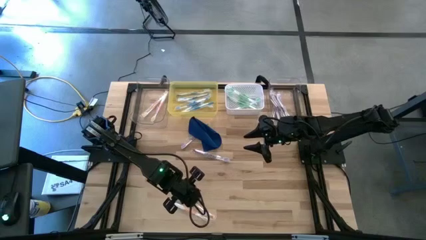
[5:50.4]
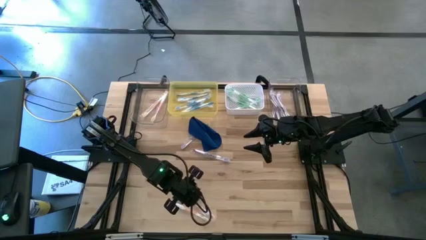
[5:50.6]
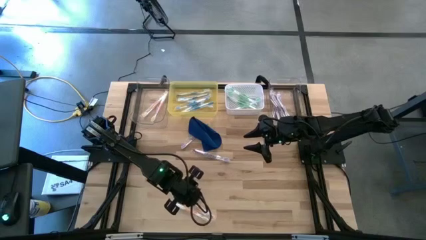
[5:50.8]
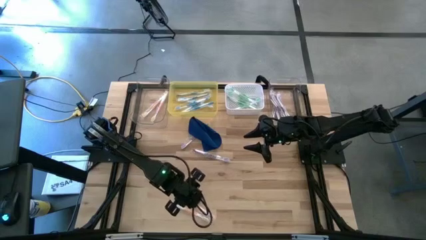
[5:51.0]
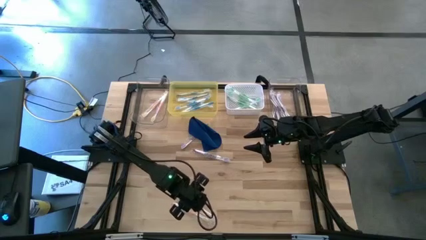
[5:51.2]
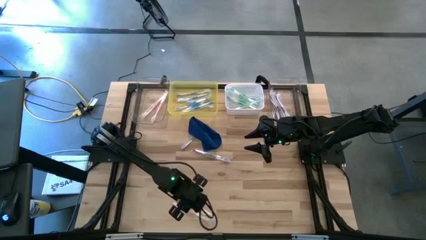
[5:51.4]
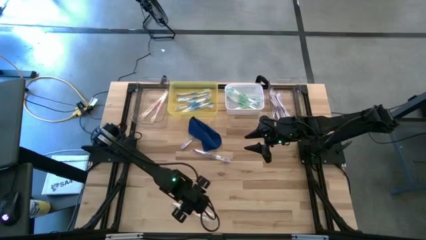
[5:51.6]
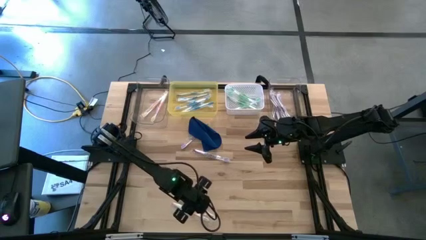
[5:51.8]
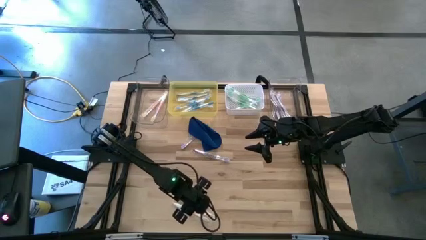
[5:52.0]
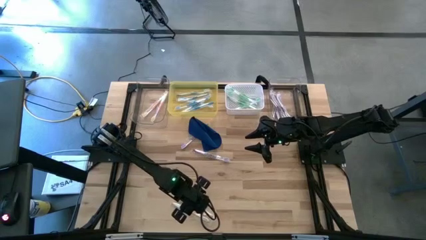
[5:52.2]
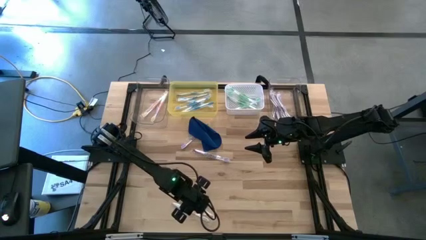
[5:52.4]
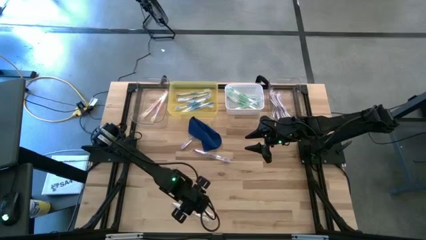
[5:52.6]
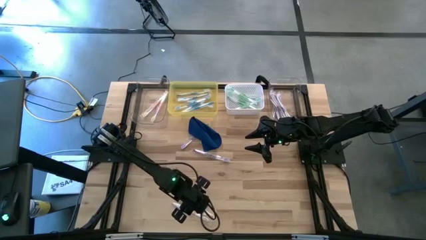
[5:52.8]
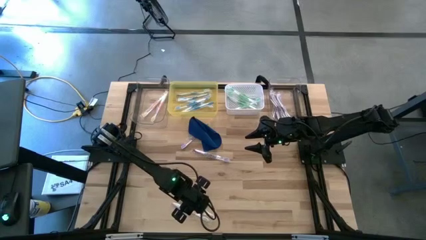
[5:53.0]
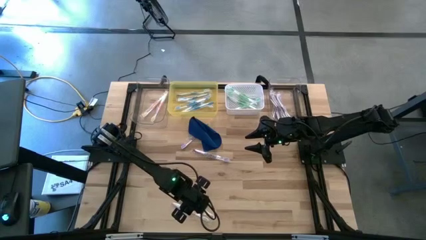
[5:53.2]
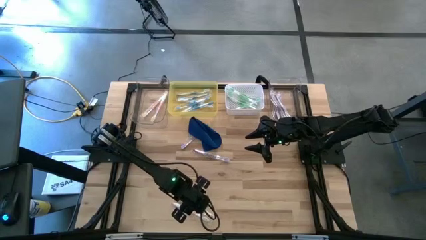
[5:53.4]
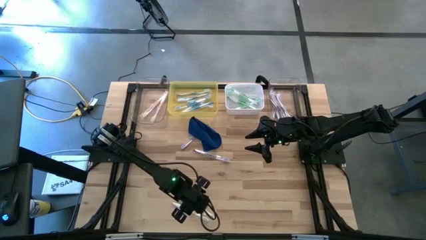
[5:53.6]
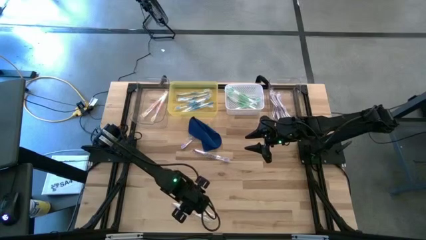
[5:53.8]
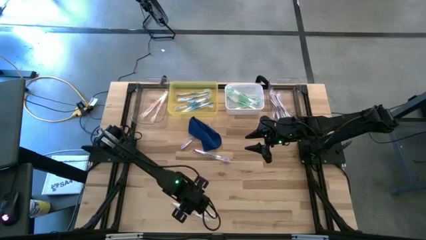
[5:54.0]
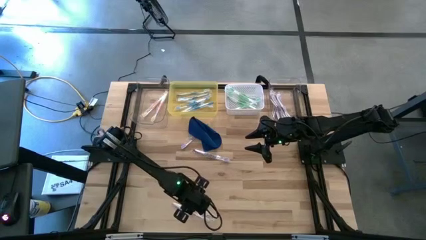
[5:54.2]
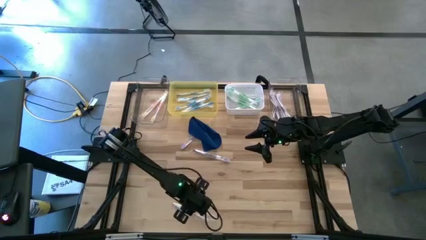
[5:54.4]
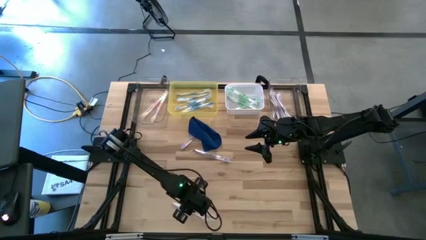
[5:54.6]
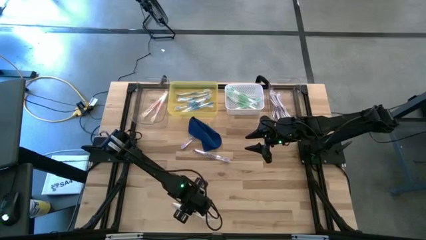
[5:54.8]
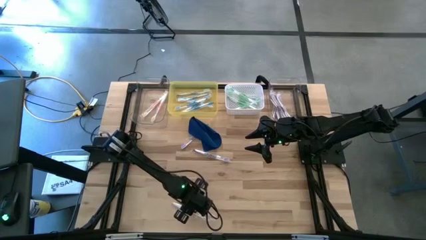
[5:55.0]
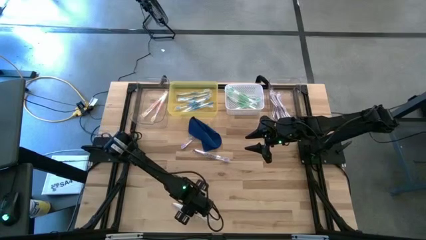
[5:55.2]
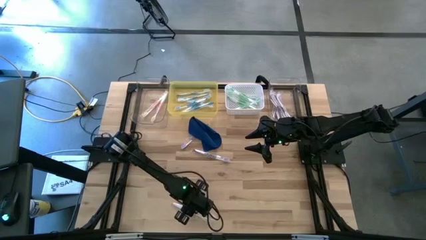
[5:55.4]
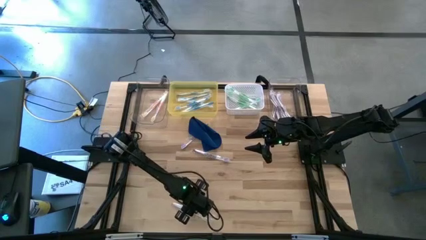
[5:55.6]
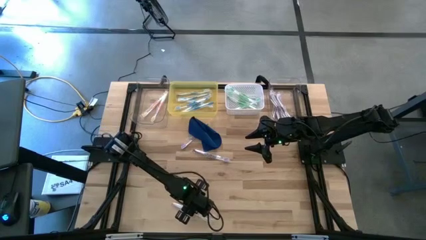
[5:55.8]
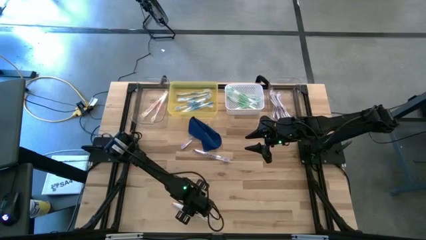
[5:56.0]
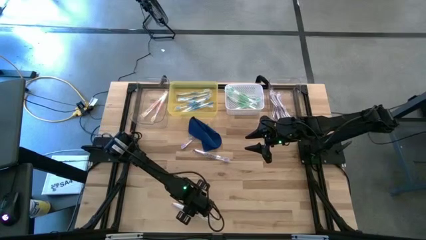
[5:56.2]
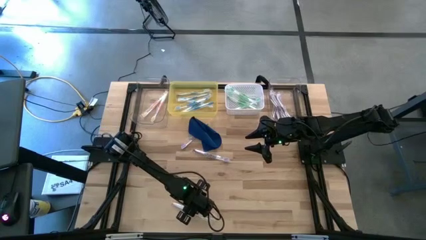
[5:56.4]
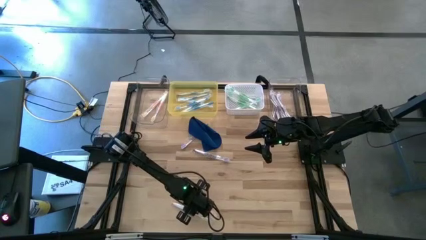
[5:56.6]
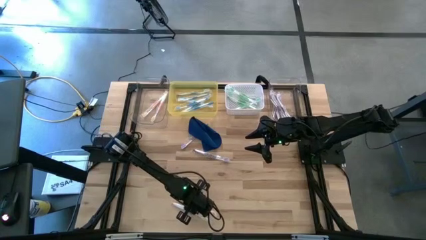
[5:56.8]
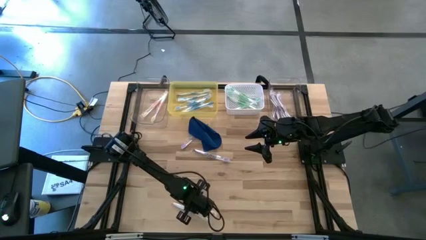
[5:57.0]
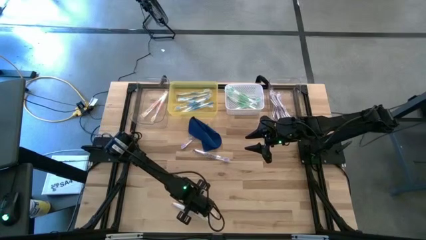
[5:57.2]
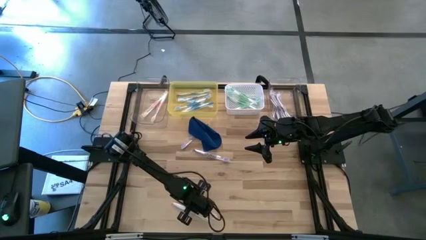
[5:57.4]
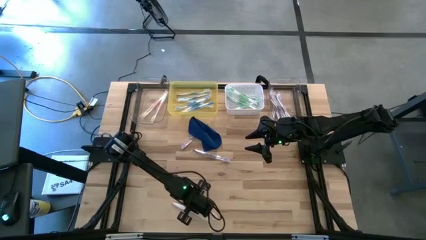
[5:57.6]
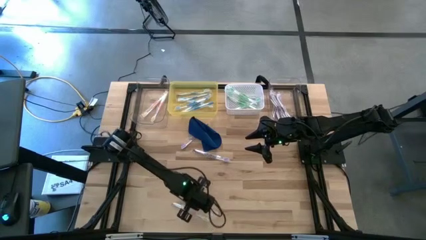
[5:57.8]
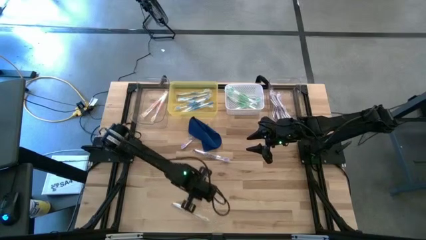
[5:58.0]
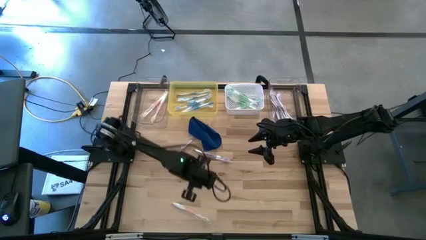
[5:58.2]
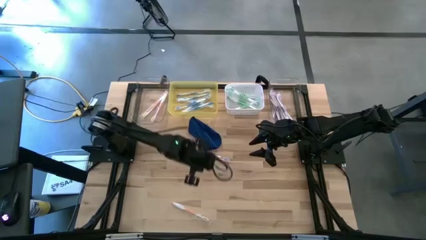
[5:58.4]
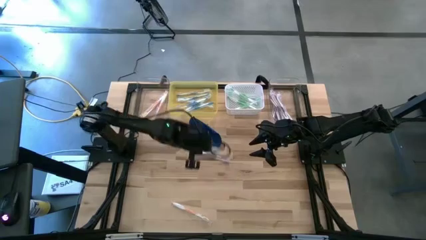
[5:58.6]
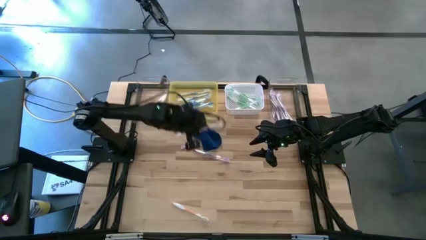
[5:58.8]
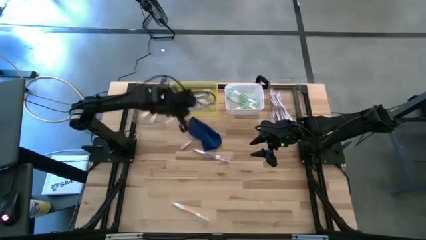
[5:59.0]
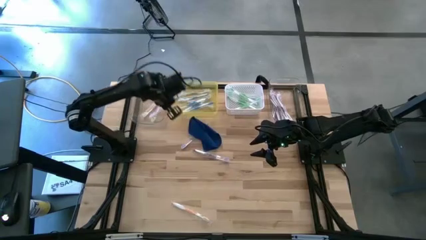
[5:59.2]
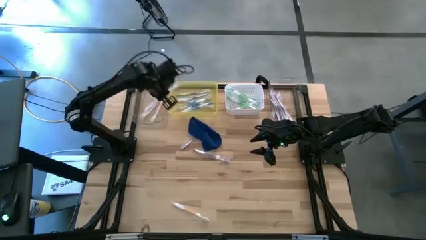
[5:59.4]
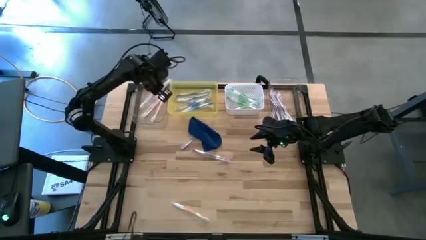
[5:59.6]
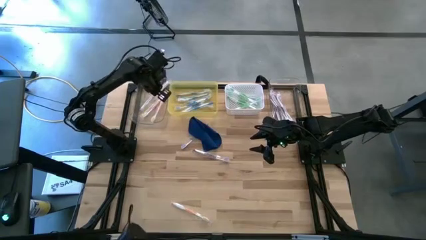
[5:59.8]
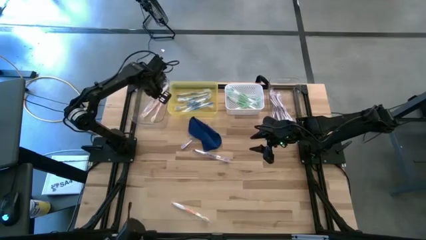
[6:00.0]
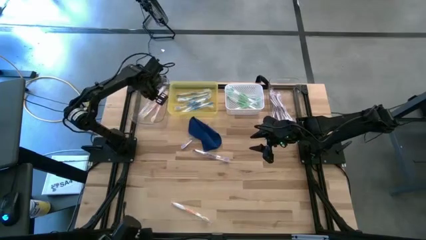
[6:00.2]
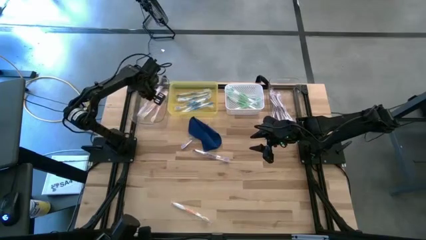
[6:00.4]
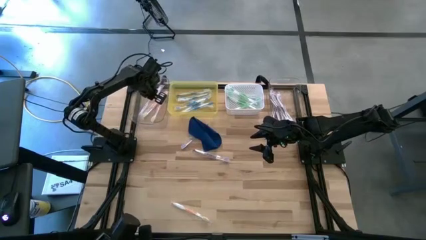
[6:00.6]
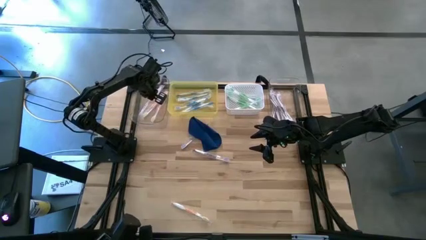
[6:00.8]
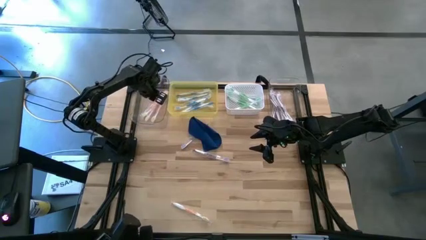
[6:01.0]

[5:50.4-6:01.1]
Task: Pick & Place Toothbrushes
Put the orange toothbrush into the left transparent bin

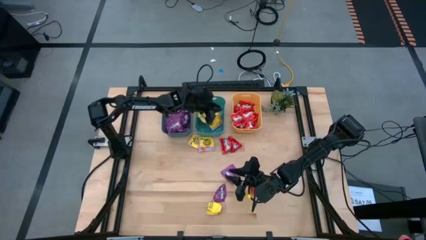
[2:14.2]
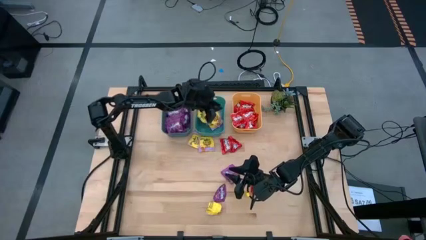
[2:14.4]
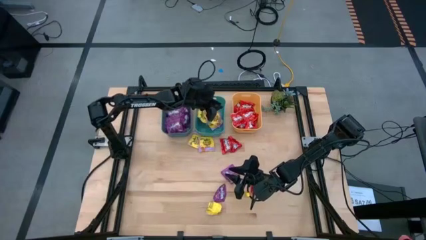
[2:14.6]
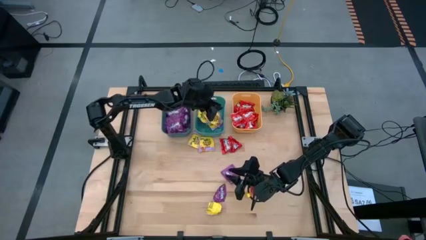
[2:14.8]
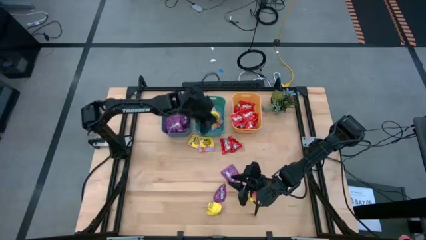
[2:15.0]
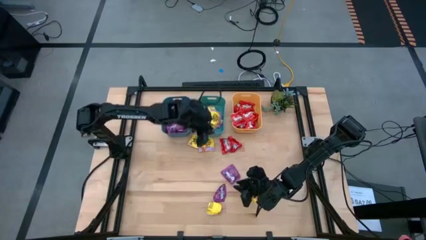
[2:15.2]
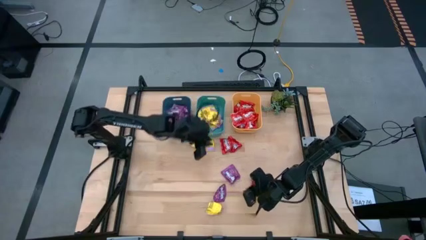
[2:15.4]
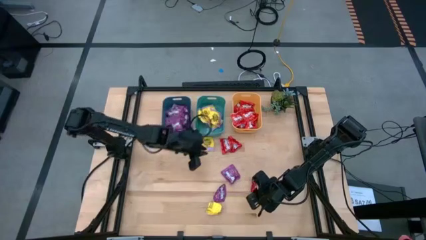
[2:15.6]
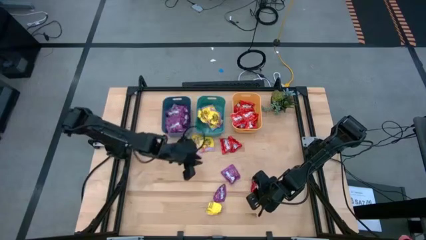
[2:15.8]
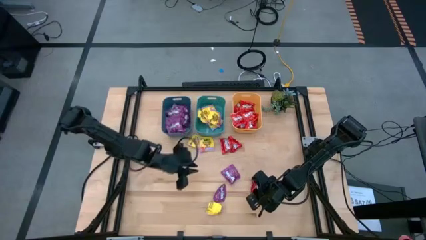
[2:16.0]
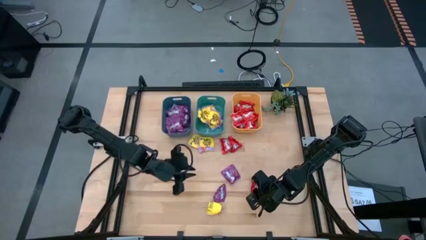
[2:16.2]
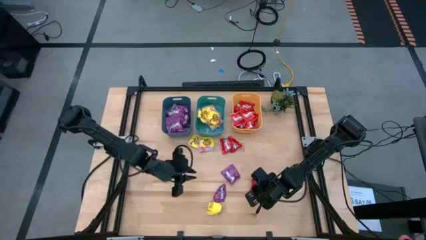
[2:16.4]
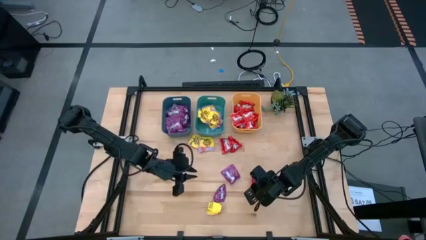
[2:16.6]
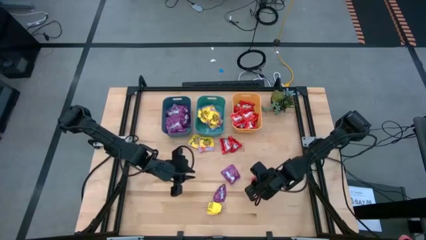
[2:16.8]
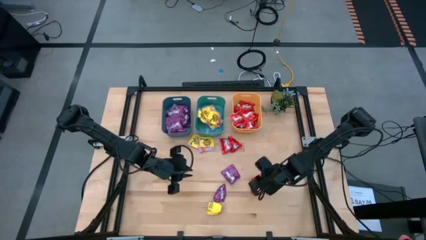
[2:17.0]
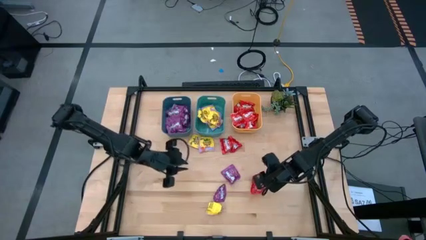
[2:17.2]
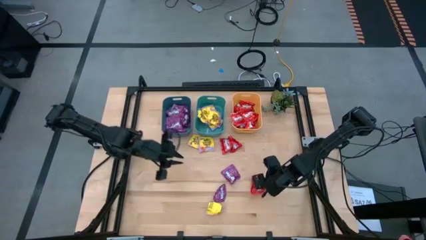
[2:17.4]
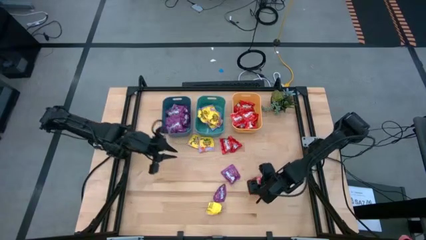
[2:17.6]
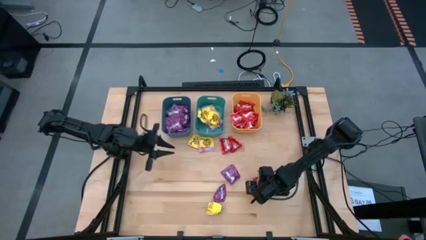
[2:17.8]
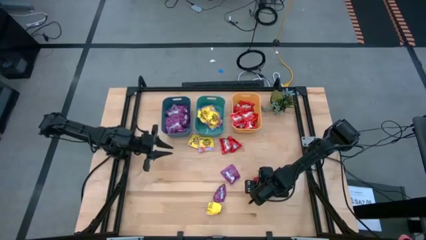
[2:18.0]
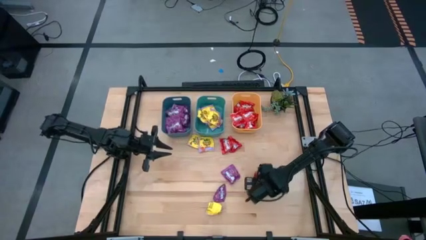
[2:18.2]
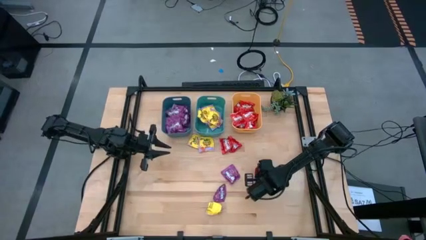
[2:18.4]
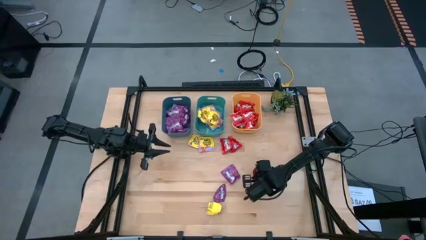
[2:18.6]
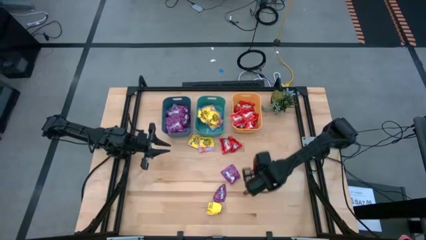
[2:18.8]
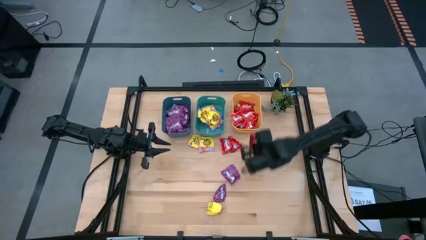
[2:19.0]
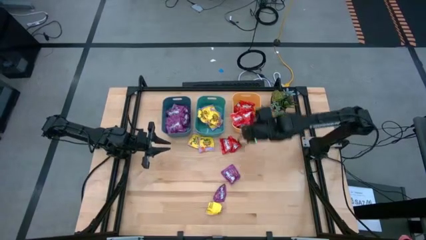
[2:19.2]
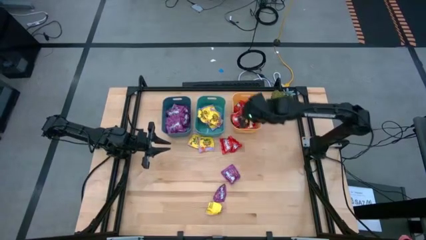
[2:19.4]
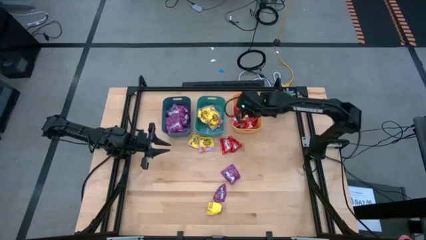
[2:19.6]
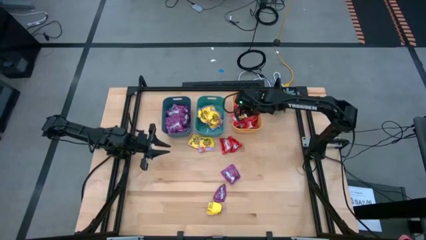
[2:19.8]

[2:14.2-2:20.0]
Task: Sort candy
Put the red candy into the yellow bin
